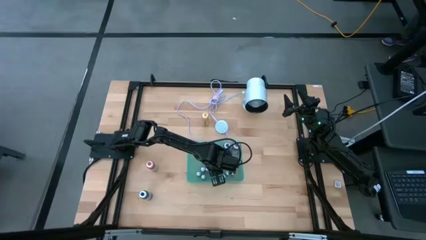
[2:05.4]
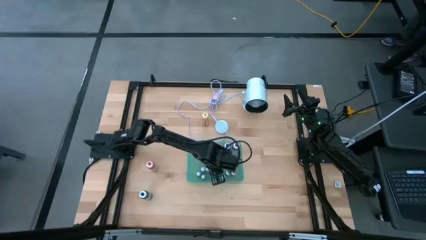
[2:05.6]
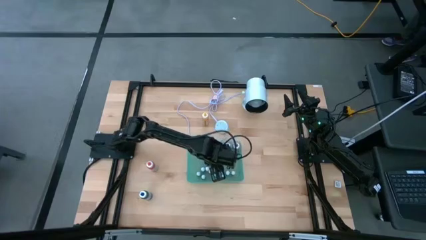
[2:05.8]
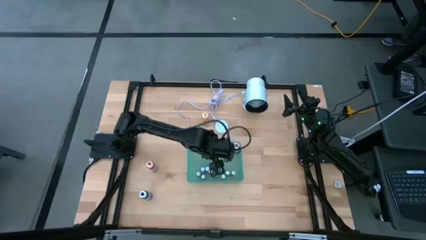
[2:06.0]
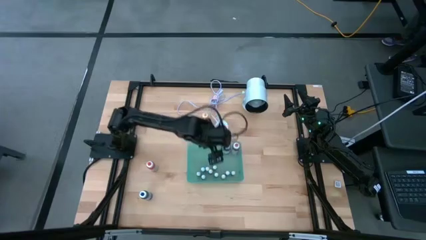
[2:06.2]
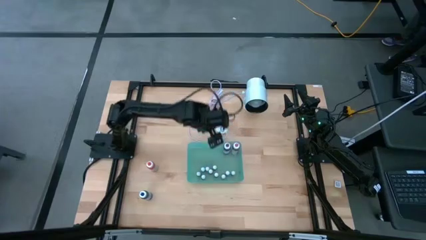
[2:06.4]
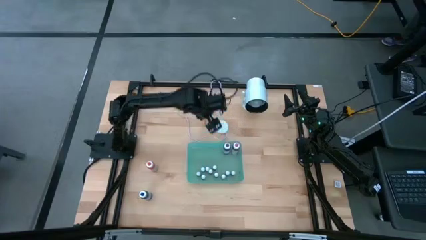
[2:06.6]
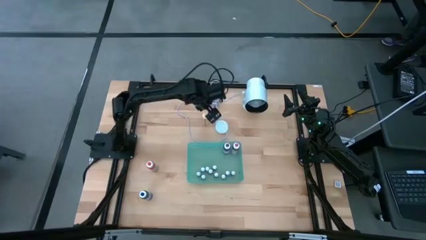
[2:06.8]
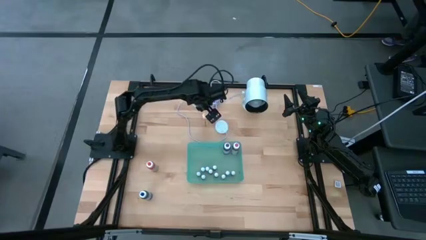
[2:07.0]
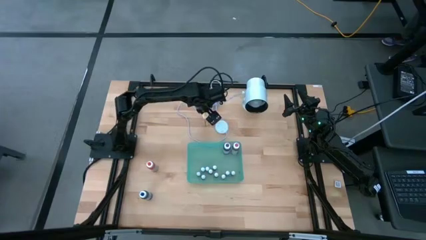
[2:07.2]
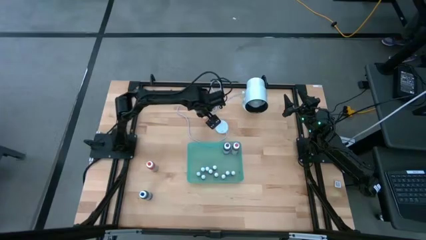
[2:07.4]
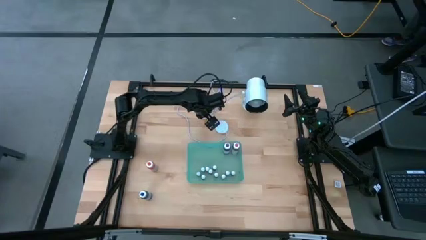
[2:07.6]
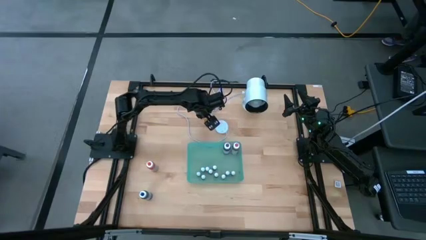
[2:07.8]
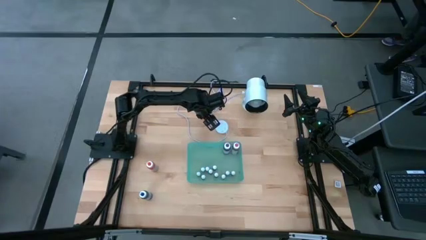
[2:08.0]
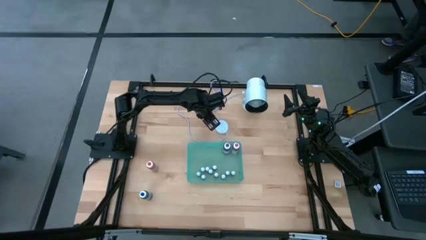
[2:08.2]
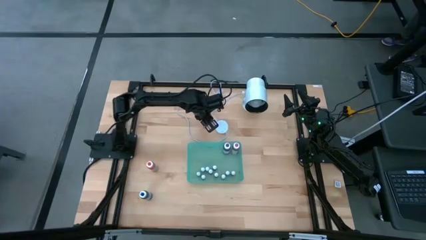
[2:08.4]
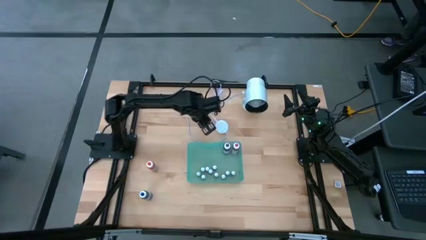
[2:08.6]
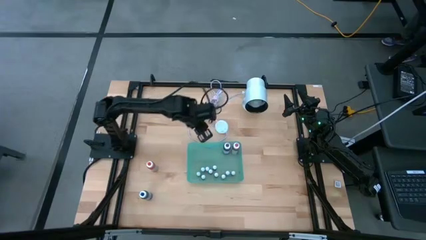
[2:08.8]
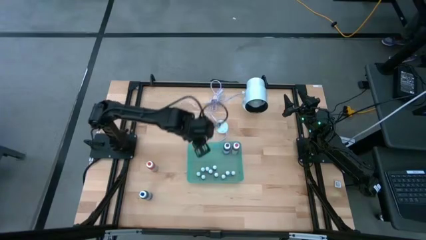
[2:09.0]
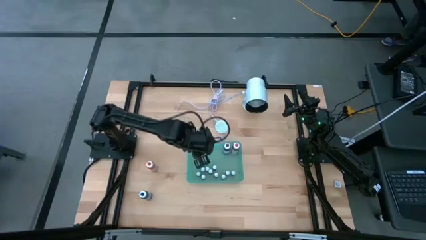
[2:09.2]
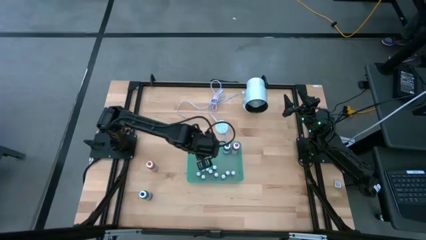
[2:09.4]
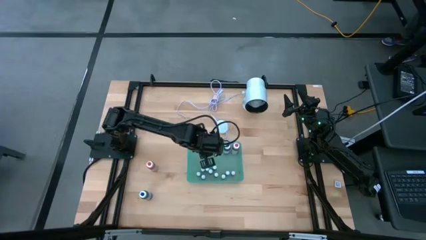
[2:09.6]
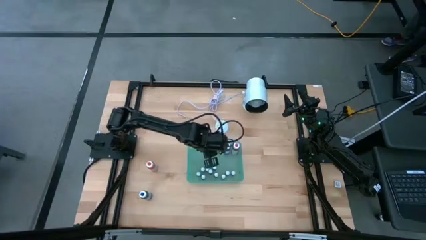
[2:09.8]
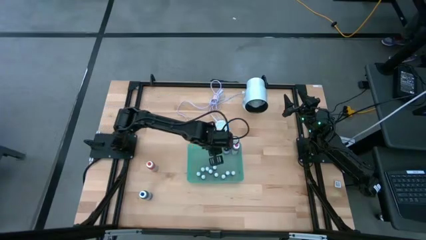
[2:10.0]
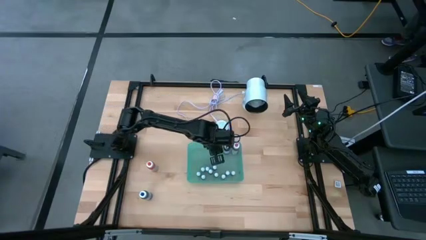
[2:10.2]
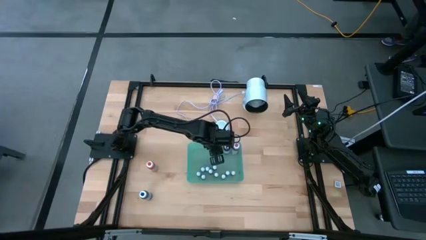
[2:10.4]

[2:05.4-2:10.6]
Task: Pick & Place food coloring
Put the big yellow food coloring bottle into the bin

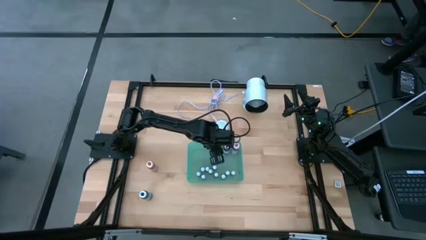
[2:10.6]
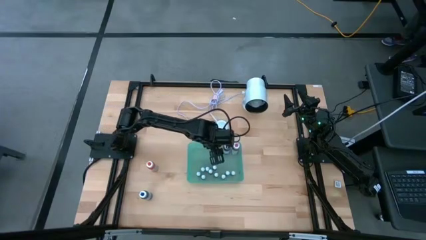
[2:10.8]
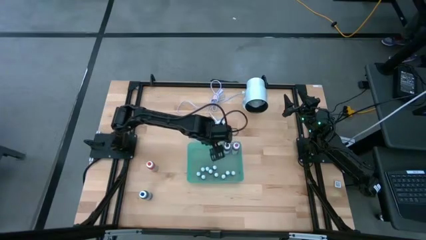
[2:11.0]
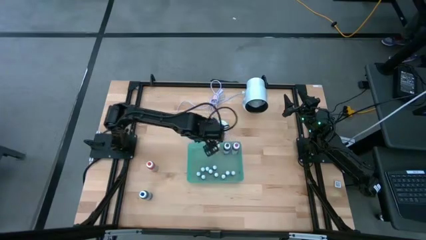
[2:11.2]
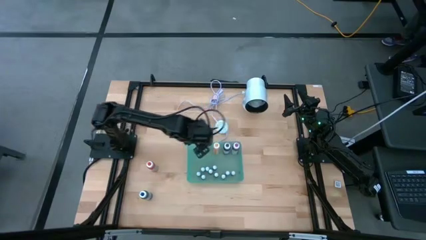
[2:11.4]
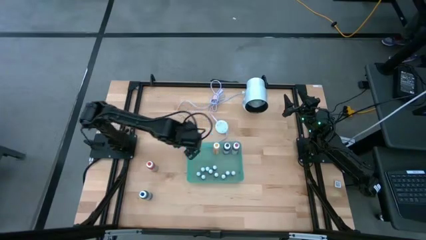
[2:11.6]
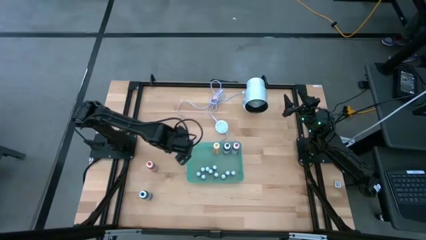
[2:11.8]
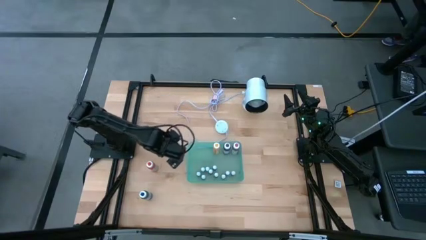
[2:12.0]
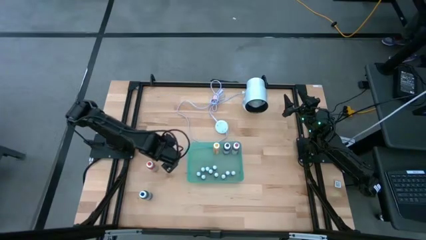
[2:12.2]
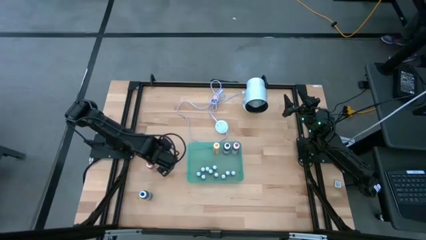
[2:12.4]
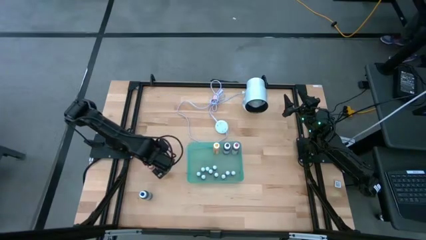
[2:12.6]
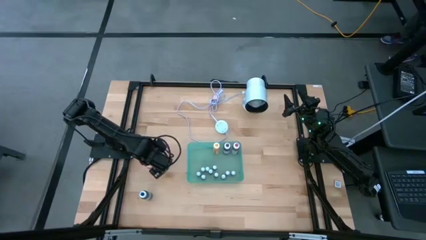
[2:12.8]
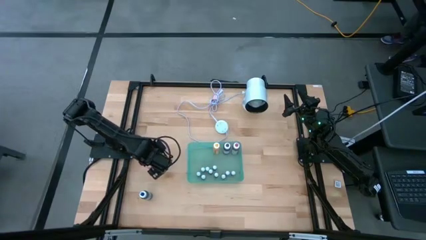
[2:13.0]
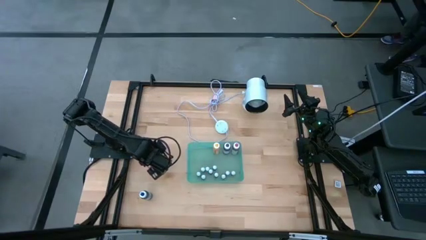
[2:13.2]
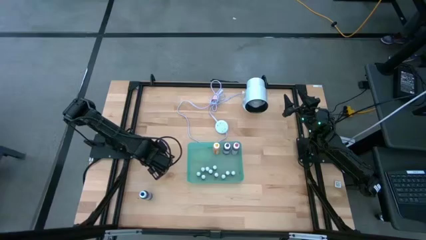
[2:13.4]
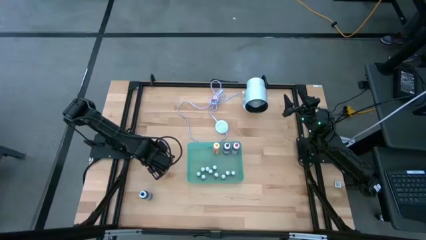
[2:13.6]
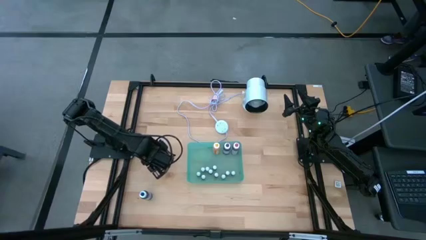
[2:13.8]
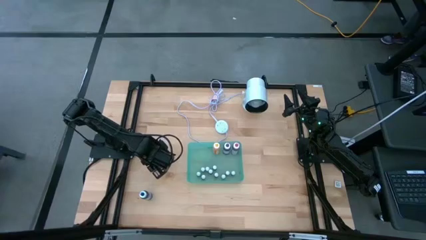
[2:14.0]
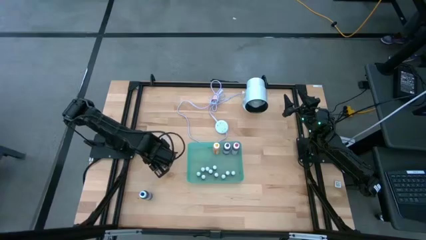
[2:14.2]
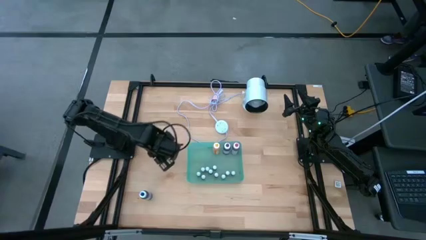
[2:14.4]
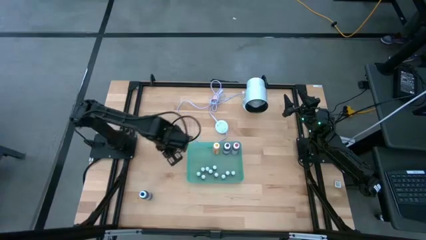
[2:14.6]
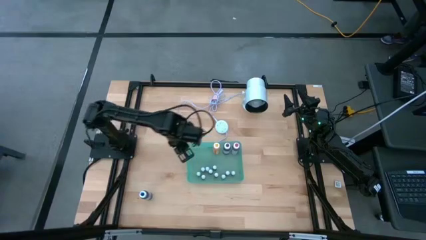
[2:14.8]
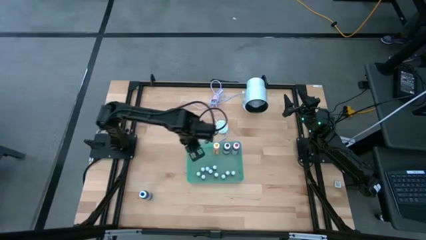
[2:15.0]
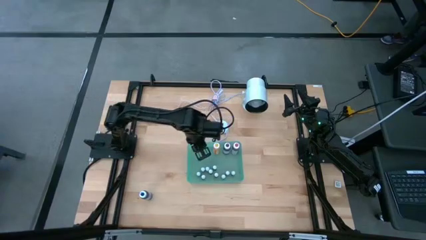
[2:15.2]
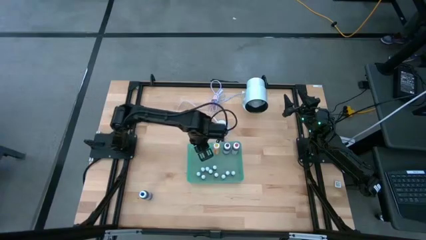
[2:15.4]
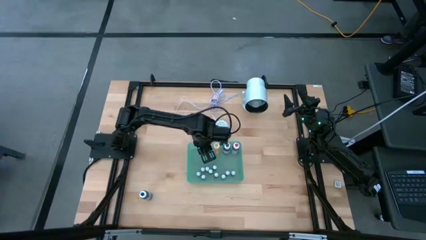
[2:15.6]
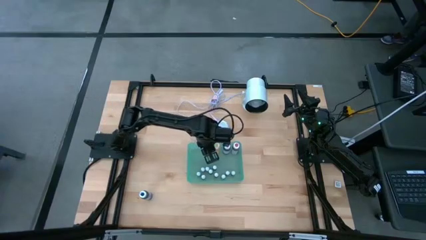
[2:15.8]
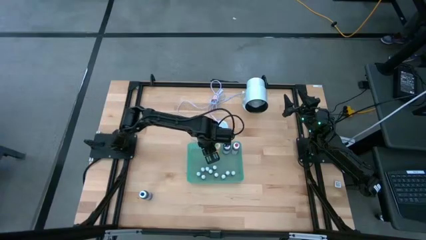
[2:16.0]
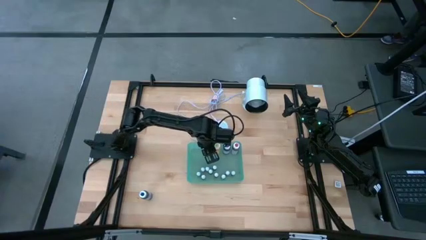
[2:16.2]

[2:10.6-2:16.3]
Put the big orange food coloring bottle into the bin

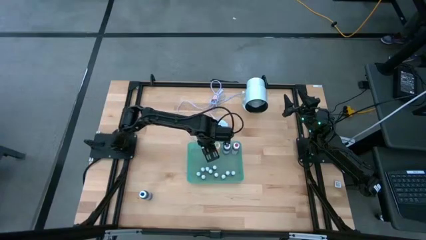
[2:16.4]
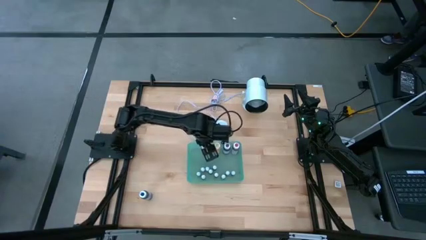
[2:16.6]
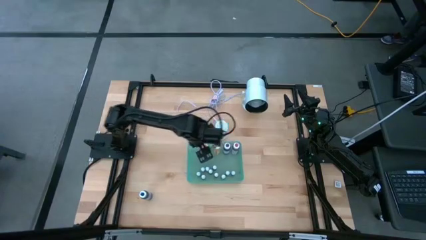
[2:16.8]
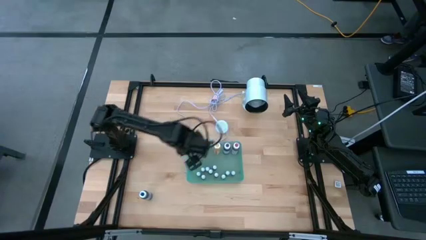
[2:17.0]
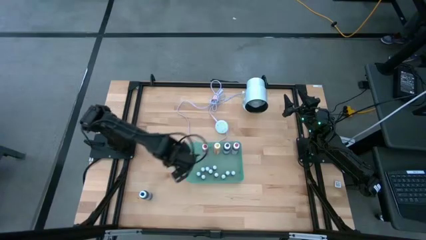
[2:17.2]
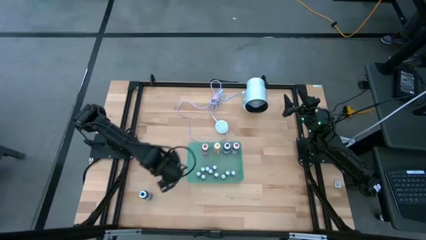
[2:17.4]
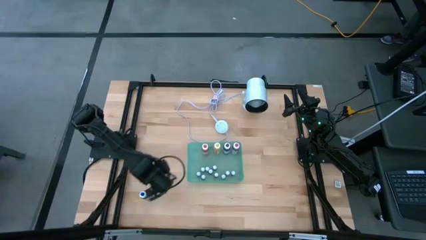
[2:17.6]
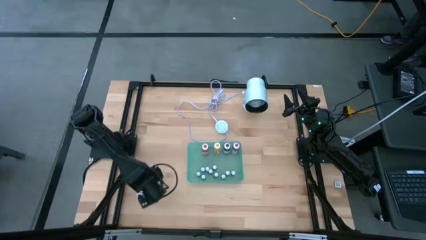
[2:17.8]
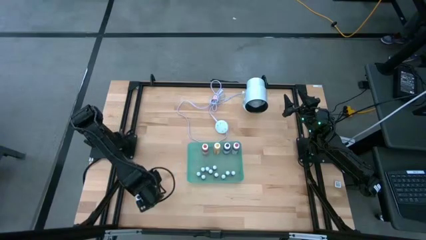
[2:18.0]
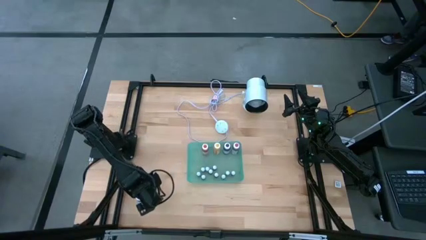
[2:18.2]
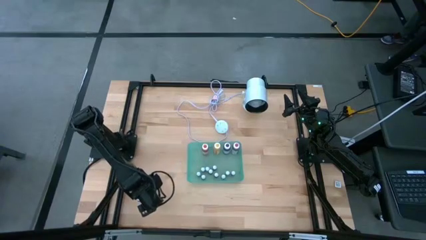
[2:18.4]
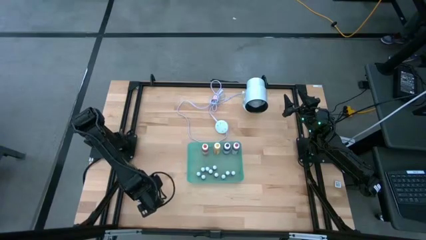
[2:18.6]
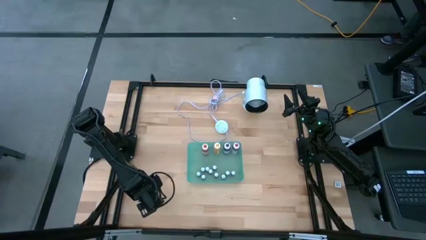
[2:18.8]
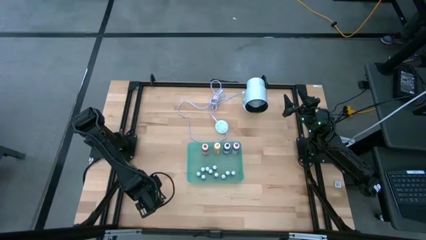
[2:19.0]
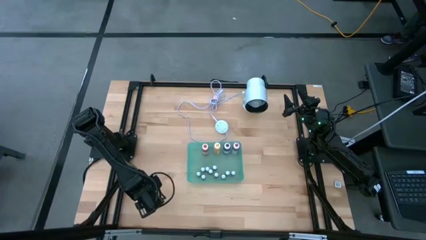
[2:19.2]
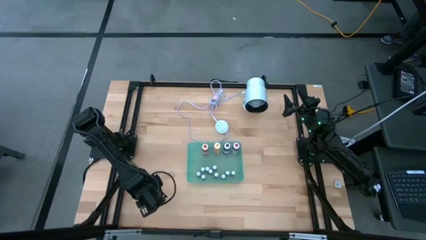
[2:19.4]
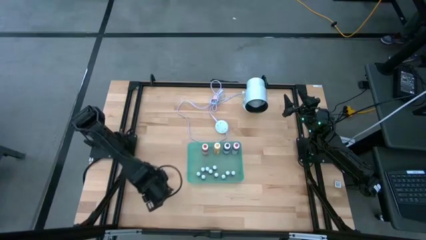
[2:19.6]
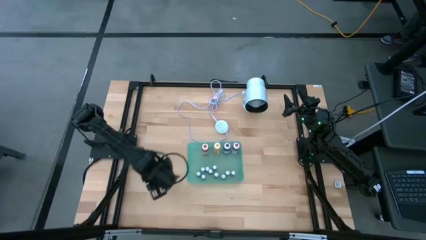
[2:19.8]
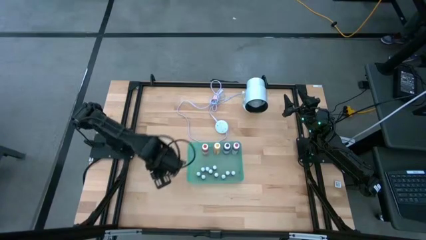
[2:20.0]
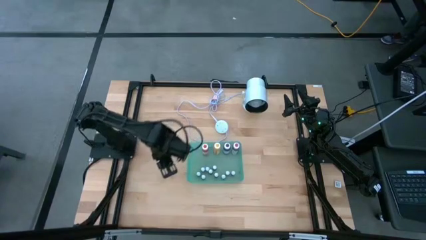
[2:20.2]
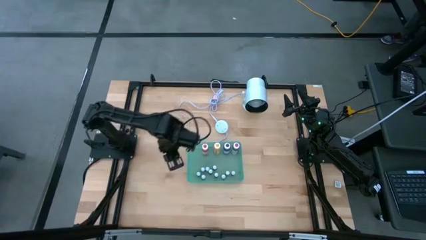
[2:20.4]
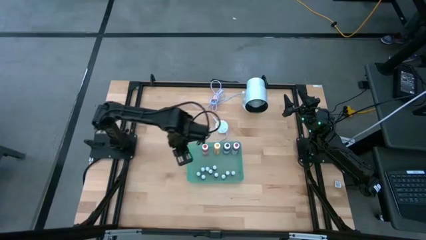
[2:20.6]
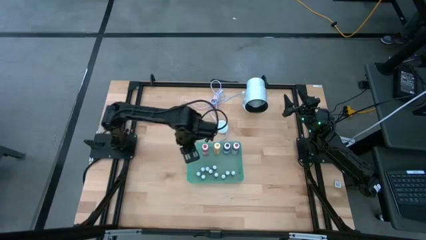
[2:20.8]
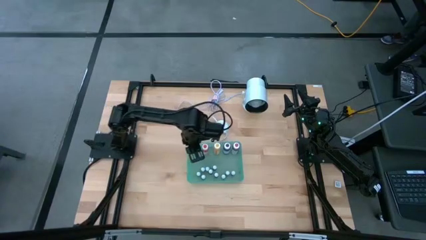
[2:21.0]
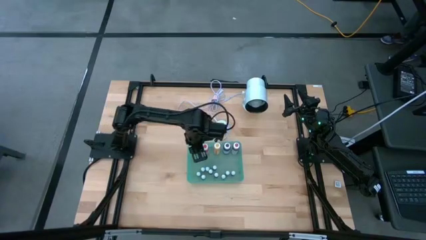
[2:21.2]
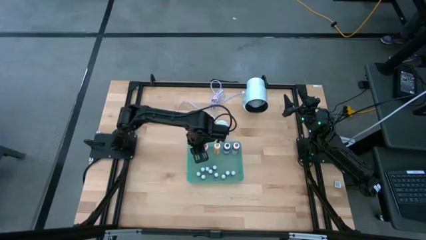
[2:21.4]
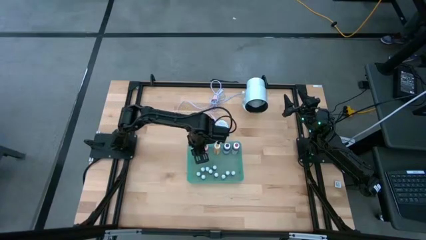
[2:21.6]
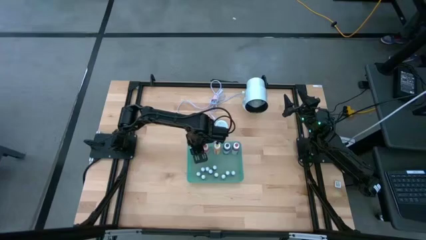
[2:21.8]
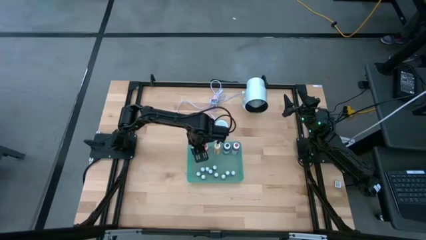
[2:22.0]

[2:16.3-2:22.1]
Put the big blue food coloring bottle into the bin
